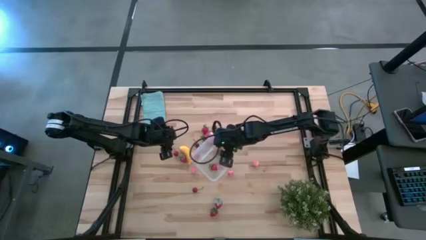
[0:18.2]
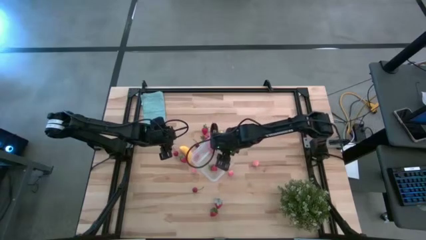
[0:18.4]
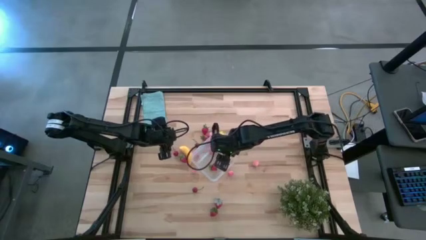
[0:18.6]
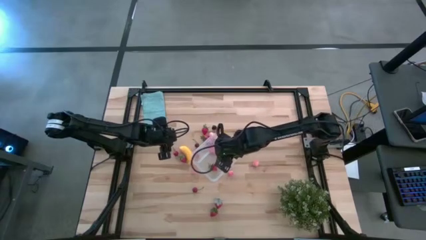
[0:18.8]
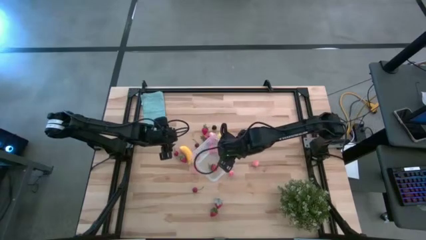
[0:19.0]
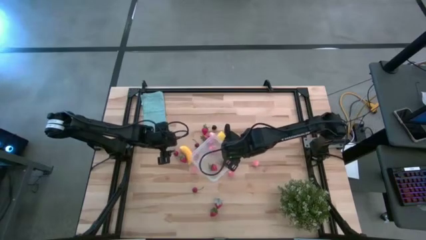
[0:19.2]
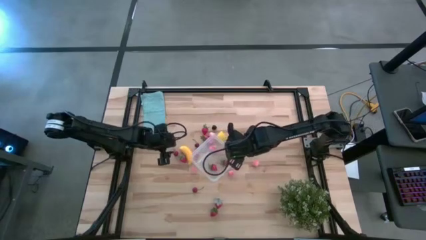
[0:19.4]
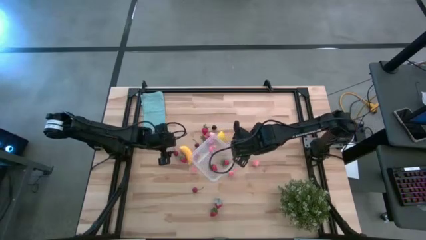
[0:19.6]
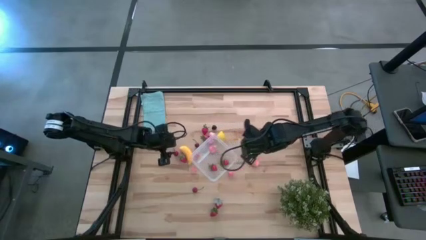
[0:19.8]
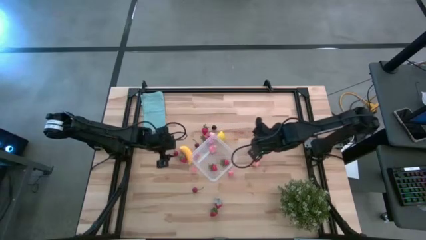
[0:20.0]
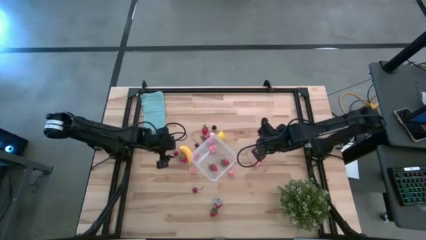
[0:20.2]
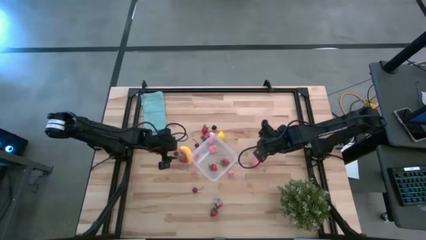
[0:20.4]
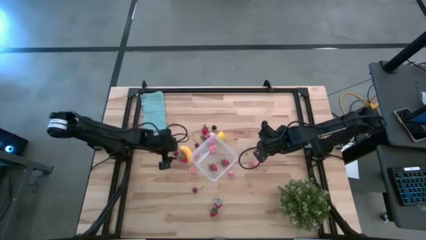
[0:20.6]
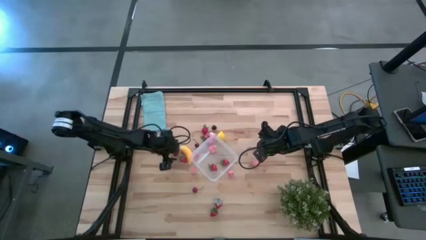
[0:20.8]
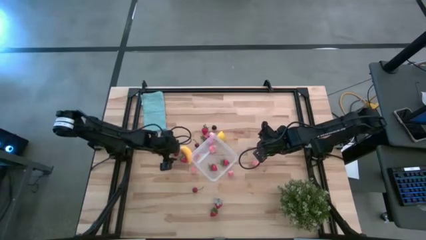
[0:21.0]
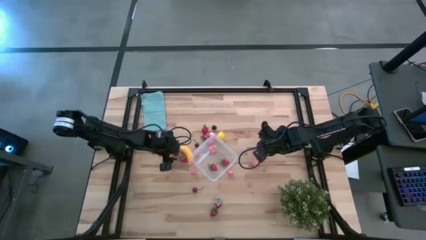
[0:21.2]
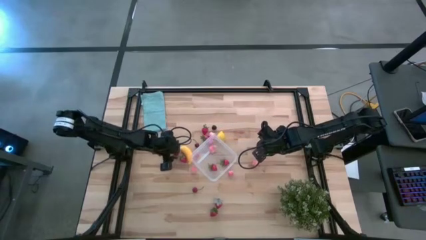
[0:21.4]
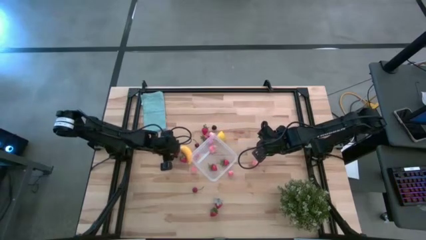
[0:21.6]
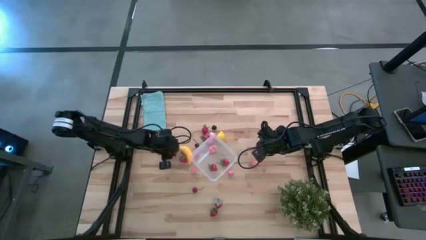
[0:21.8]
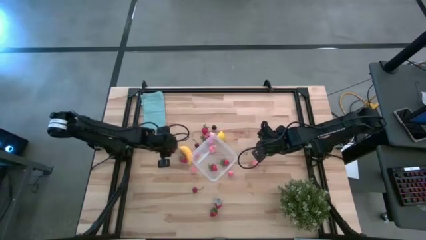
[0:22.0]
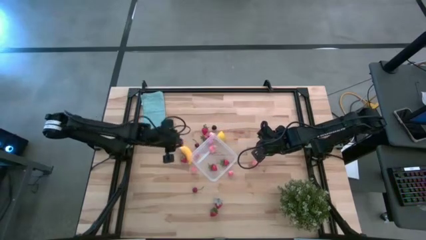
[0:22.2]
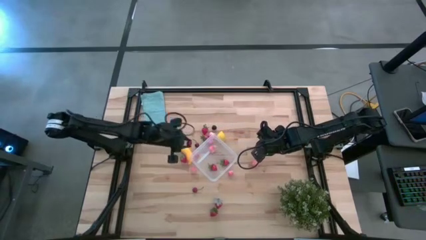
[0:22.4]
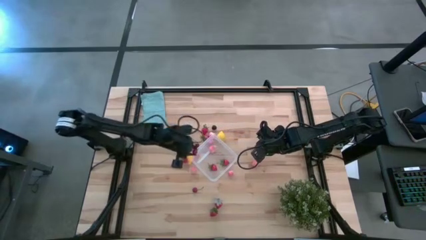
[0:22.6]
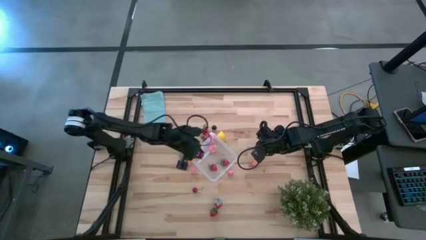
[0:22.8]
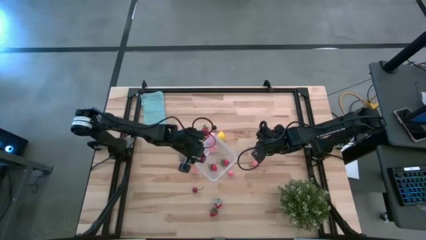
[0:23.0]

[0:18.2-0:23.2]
Task: Pick and placing Produce into tupperware
Put the red cherry into the transparent container

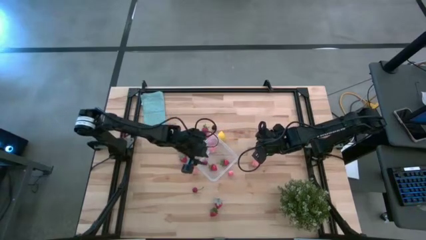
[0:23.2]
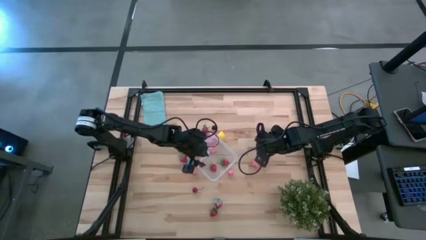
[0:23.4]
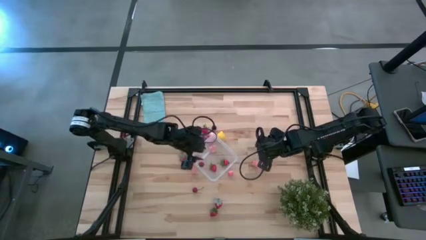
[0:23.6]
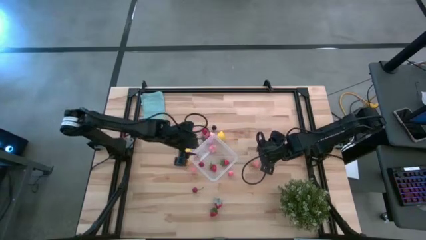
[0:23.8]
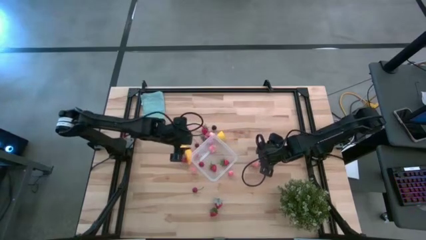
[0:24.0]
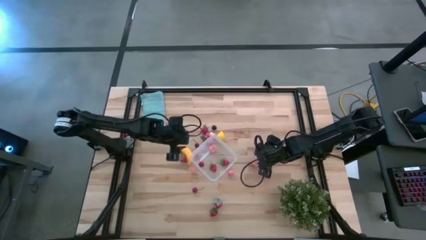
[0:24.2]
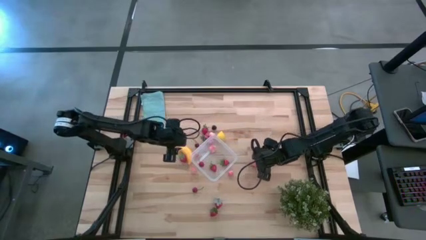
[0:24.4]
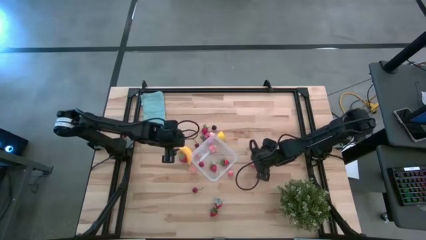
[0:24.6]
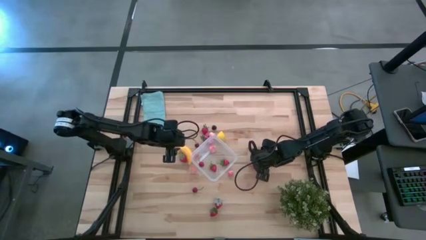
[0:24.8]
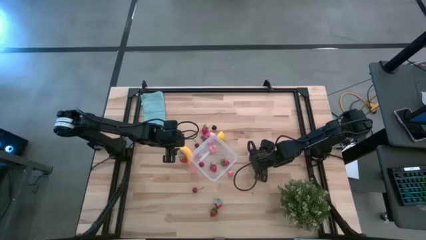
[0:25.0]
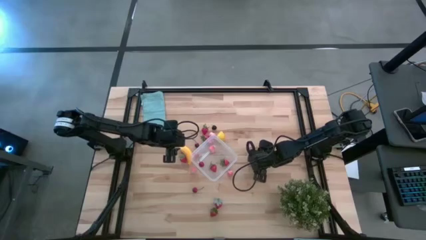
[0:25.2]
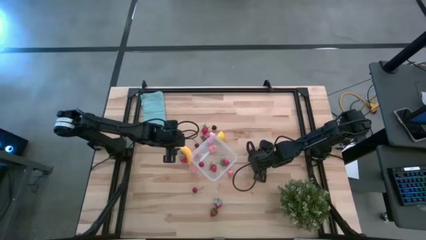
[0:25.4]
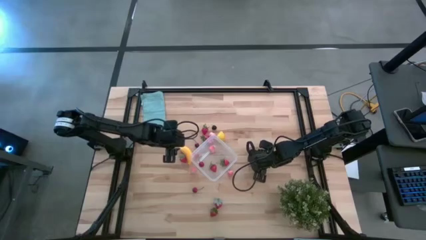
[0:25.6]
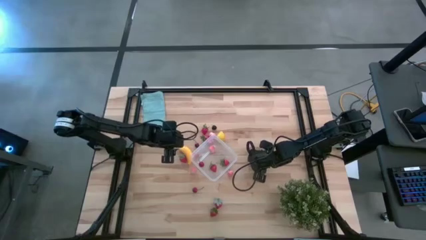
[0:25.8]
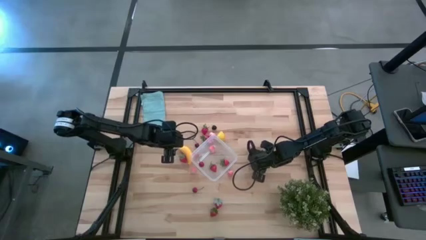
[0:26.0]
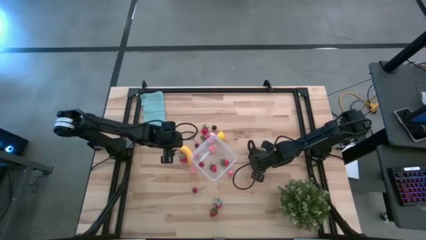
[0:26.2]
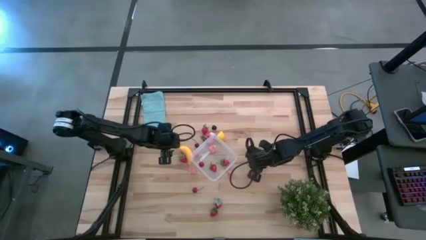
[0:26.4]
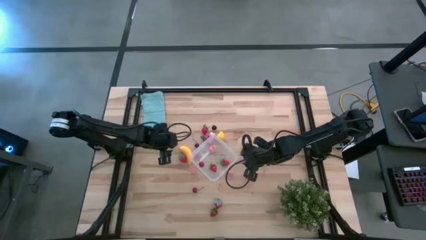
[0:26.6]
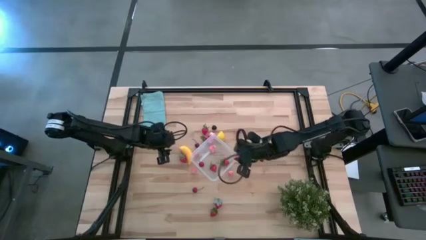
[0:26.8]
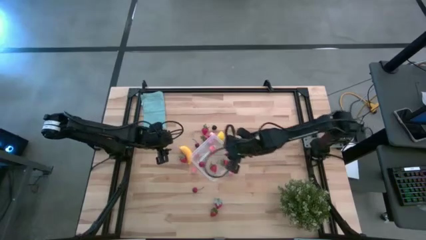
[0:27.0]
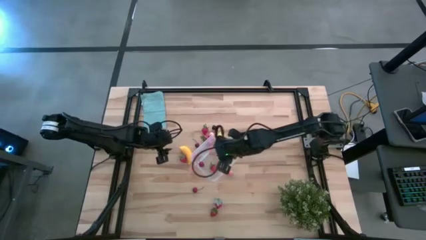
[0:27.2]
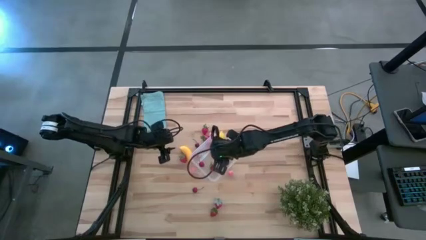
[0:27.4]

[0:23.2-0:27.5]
Put the pink peach into the transparent container

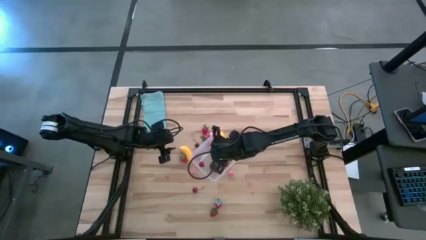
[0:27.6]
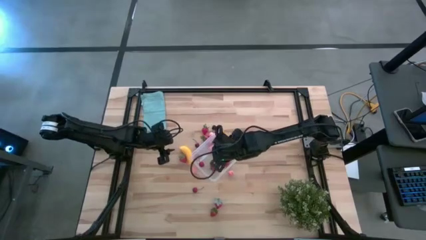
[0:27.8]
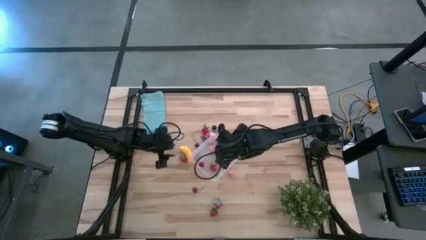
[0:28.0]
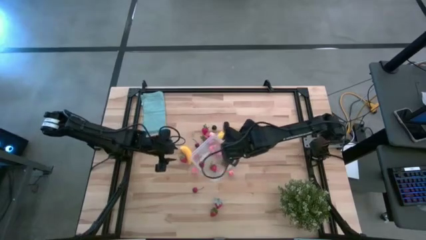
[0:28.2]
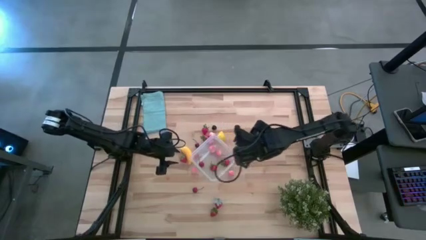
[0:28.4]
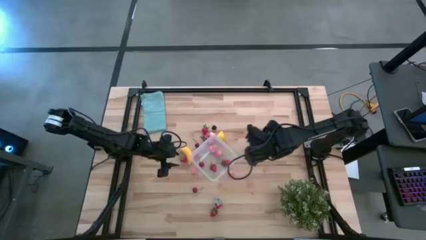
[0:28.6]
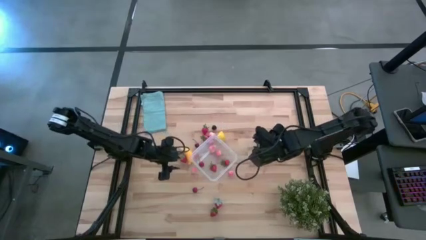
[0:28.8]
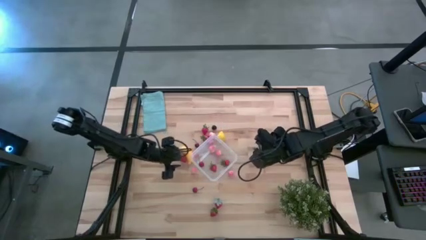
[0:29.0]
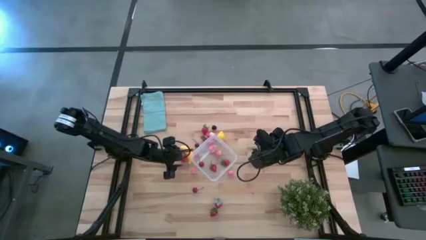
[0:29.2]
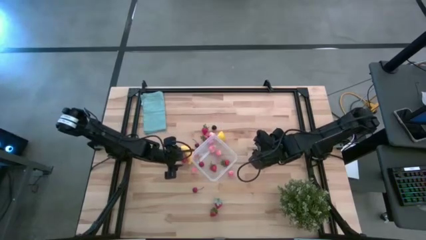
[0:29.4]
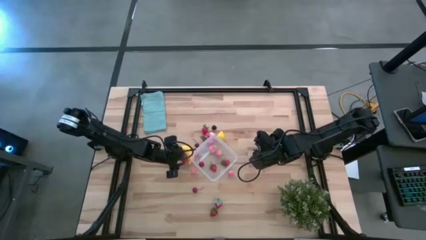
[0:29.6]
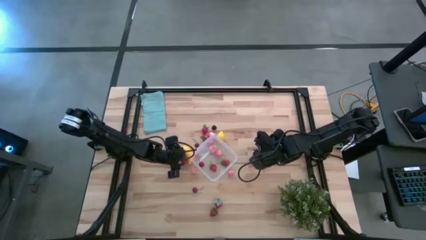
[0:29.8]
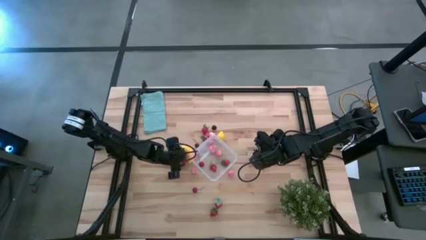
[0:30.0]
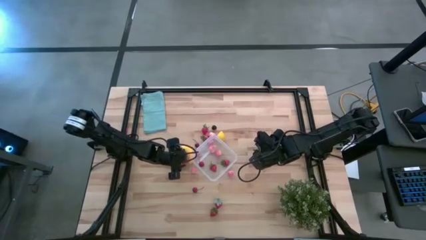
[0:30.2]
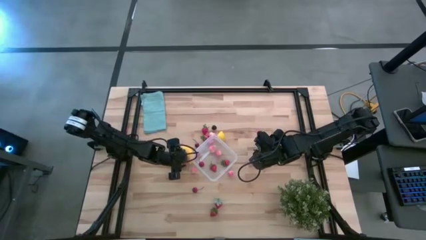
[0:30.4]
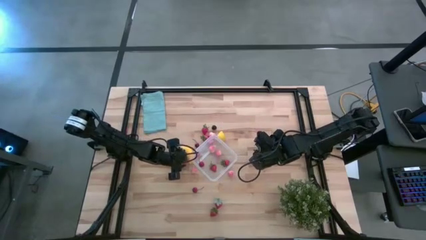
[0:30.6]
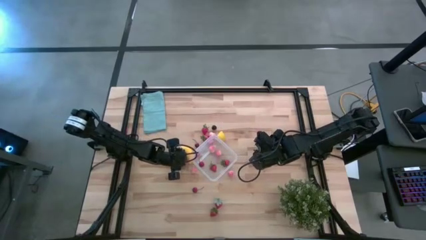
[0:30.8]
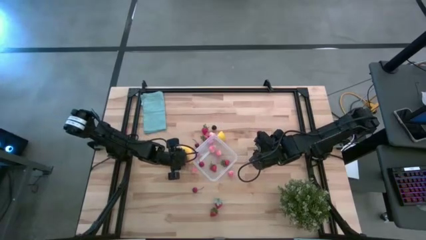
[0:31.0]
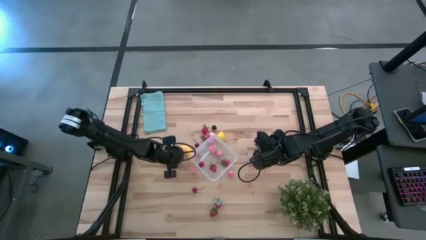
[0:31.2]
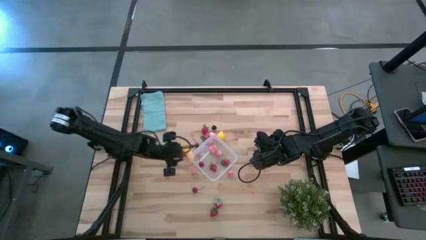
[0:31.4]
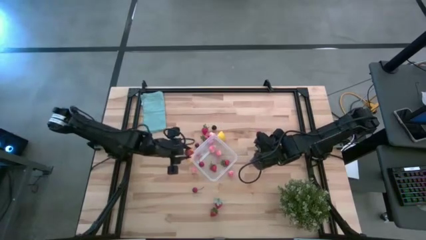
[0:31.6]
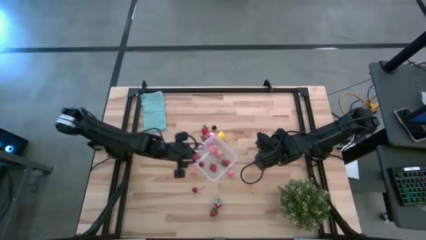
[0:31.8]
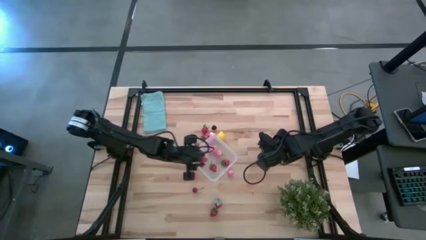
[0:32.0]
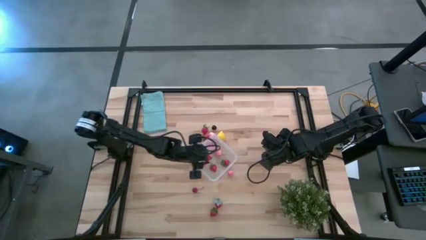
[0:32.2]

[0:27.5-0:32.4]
Put the red strawberry into the transparent container

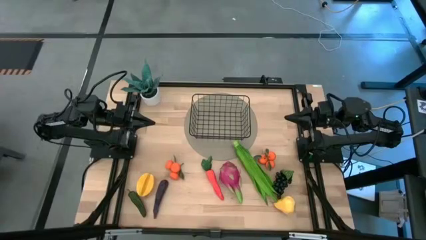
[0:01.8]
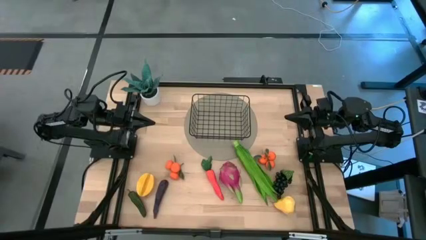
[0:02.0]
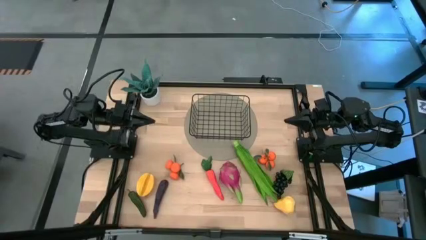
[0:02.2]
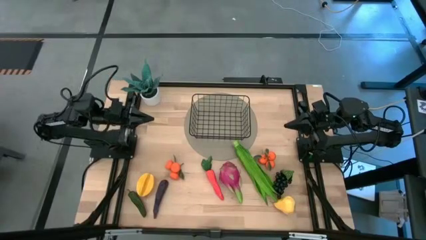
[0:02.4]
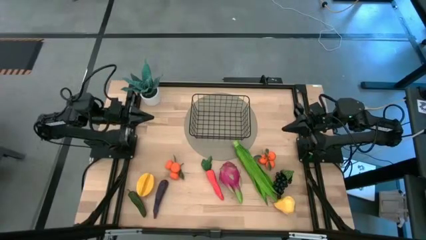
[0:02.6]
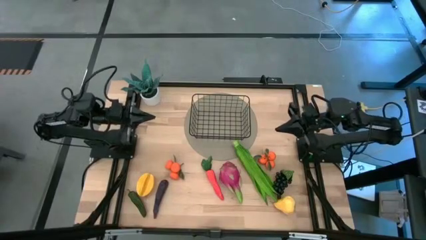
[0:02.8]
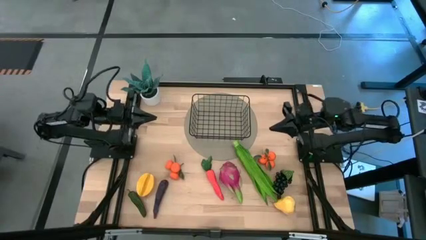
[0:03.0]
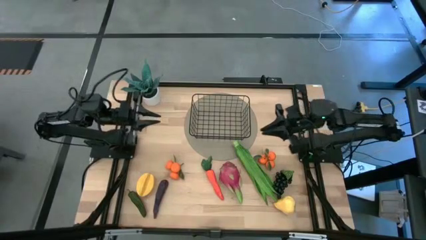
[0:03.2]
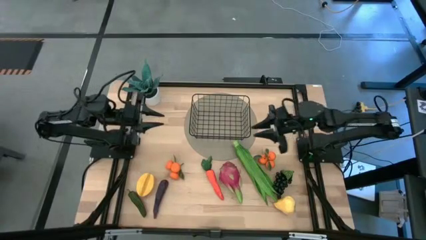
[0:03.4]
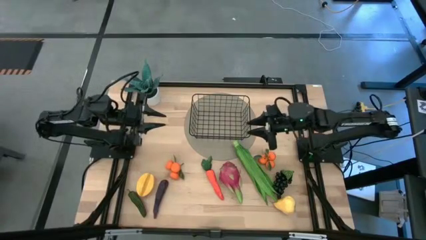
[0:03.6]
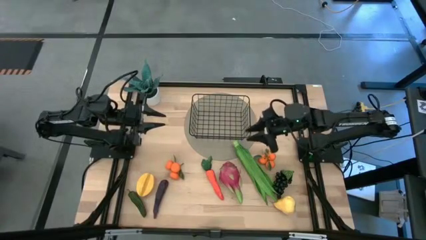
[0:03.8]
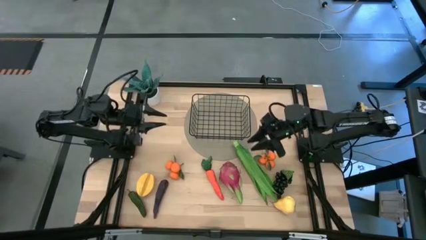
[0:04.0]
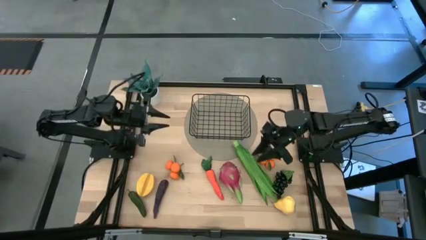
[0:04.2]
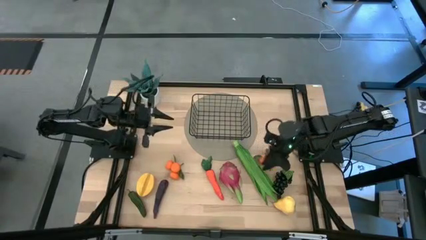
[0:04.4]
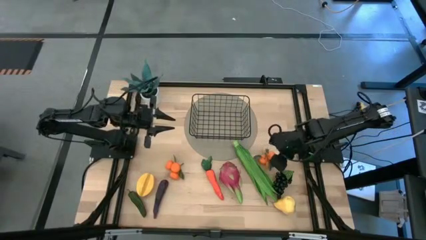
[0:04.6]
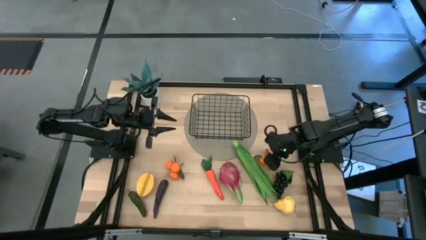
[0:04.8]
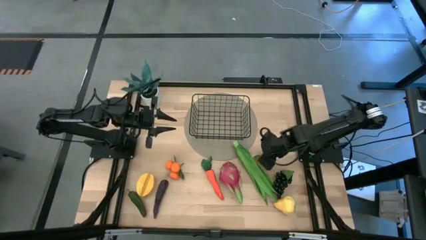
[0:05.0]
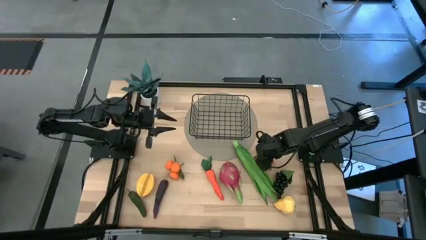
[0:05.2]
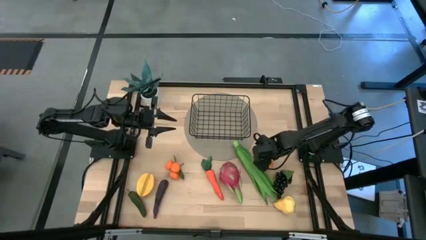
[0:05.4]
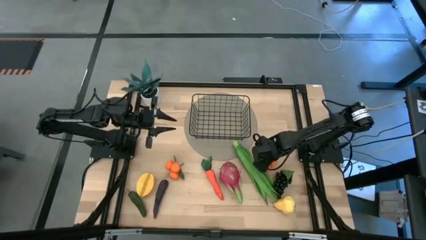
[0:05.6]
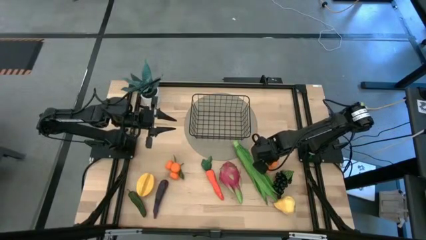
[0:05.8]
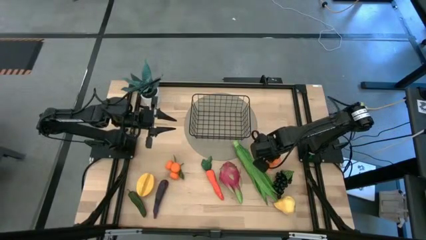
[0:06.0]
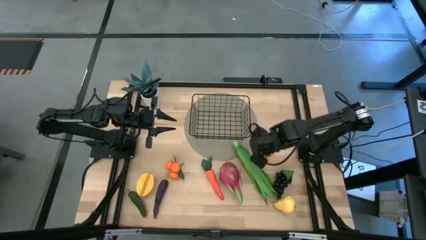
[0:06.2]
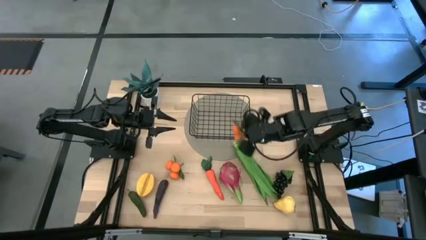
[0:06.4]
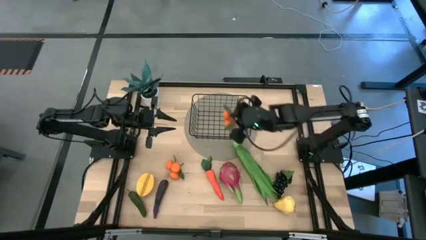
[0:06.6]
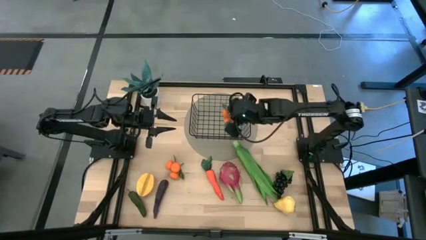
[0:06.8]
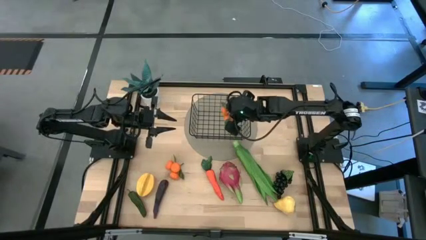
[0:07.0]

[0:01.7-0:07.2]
Task: Build produce basket
Put the right tangerine into the wire basket
